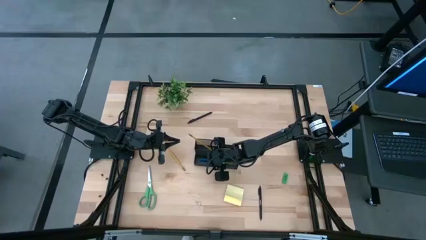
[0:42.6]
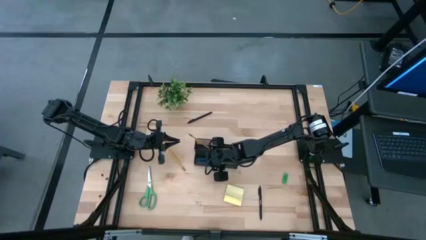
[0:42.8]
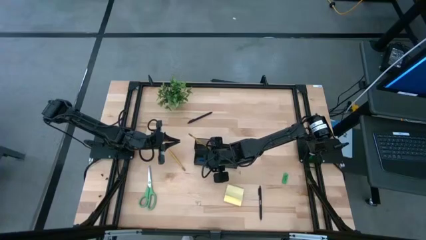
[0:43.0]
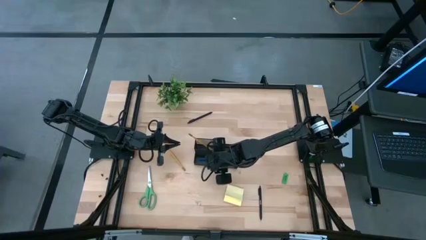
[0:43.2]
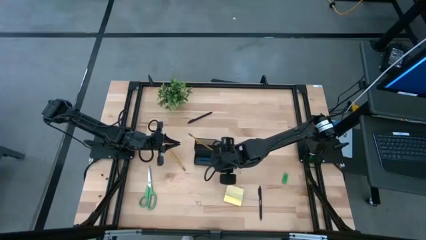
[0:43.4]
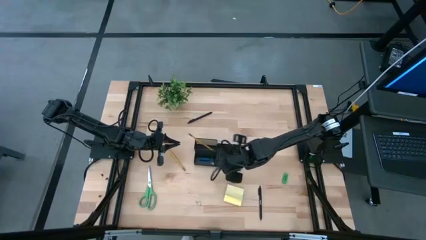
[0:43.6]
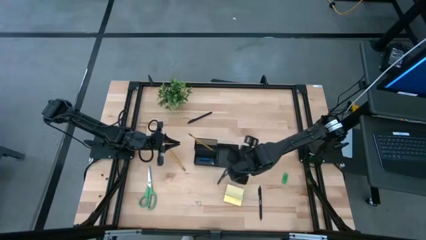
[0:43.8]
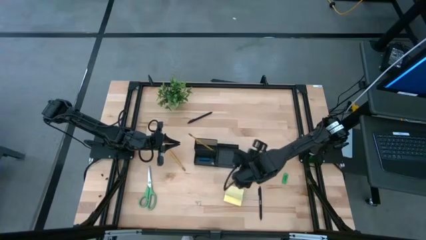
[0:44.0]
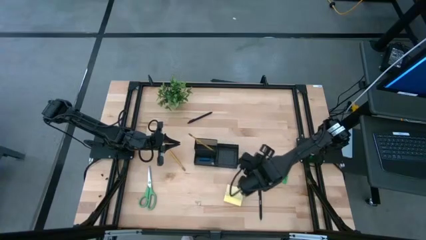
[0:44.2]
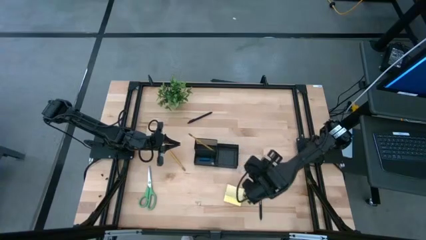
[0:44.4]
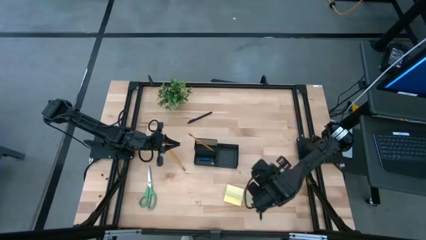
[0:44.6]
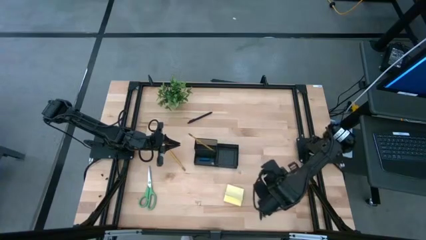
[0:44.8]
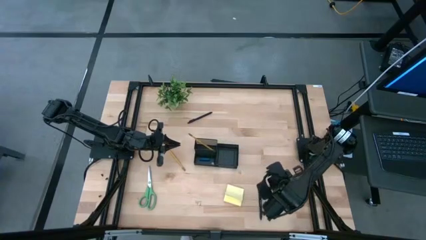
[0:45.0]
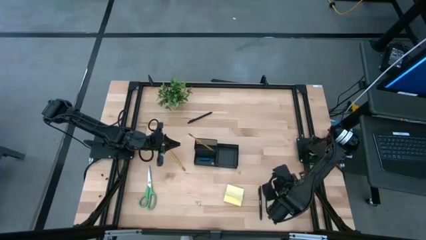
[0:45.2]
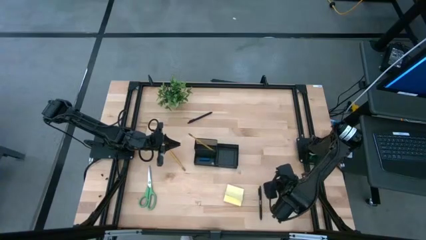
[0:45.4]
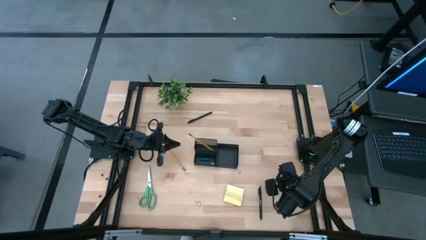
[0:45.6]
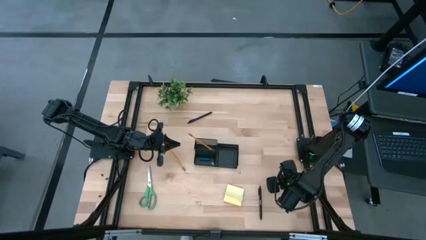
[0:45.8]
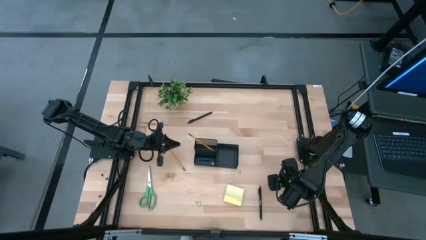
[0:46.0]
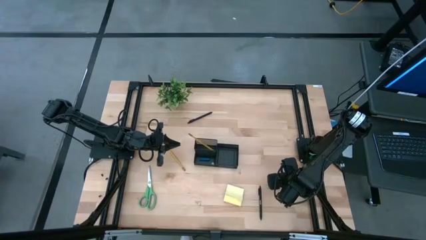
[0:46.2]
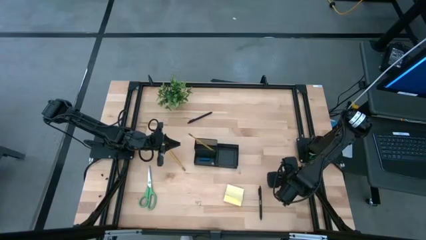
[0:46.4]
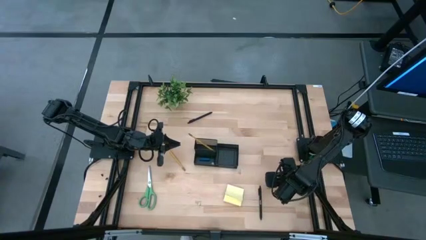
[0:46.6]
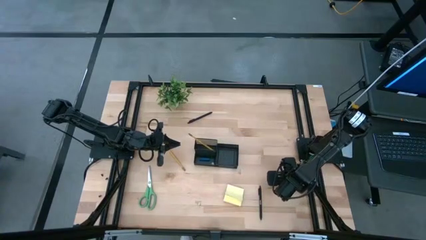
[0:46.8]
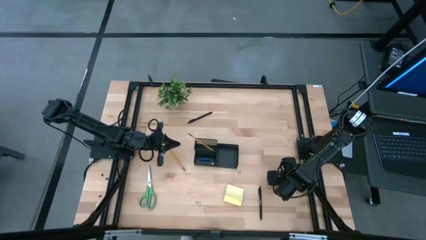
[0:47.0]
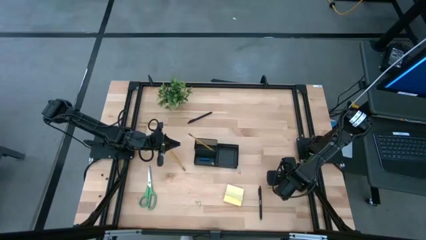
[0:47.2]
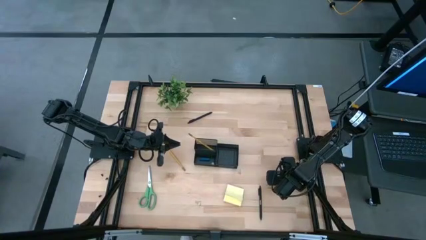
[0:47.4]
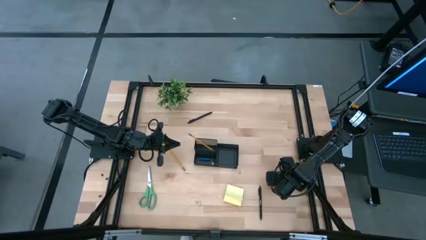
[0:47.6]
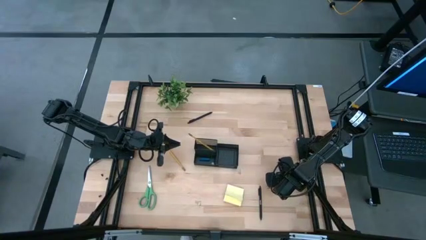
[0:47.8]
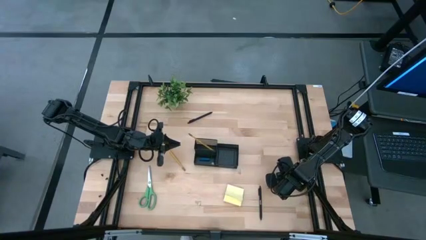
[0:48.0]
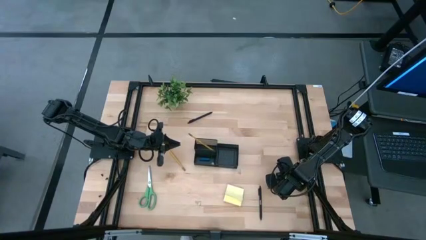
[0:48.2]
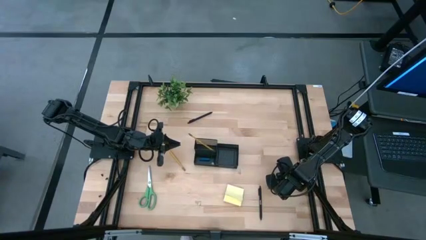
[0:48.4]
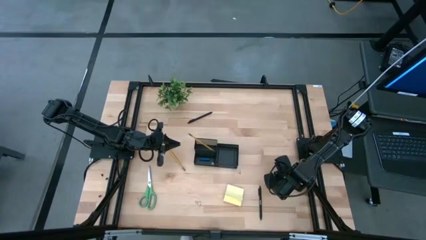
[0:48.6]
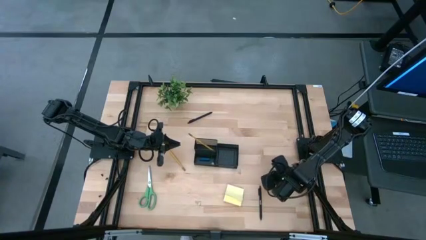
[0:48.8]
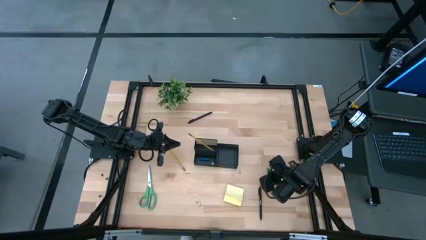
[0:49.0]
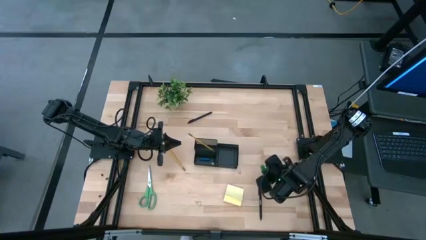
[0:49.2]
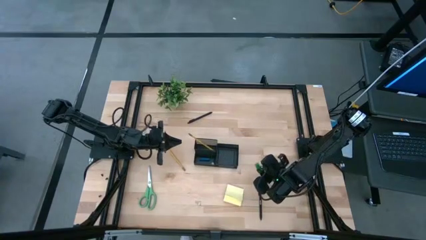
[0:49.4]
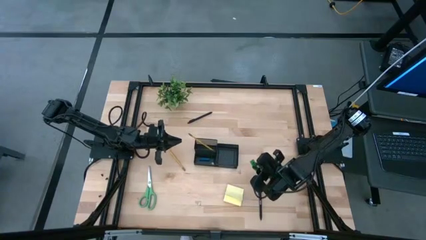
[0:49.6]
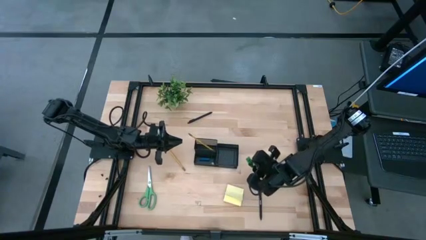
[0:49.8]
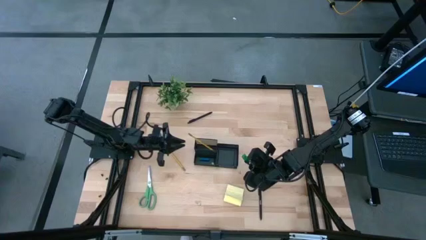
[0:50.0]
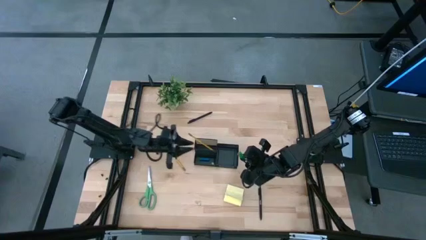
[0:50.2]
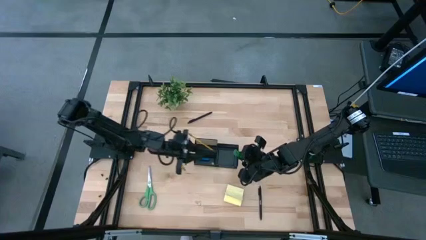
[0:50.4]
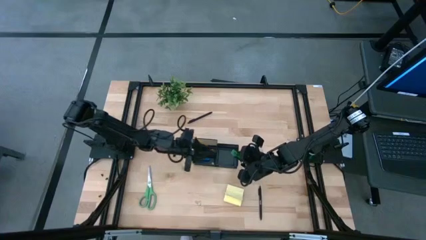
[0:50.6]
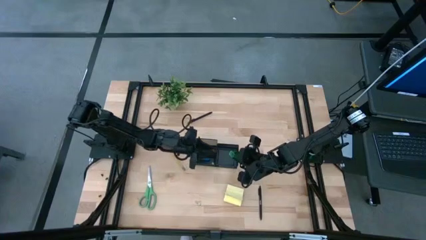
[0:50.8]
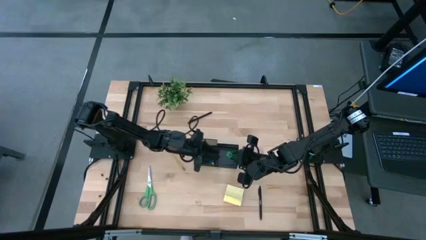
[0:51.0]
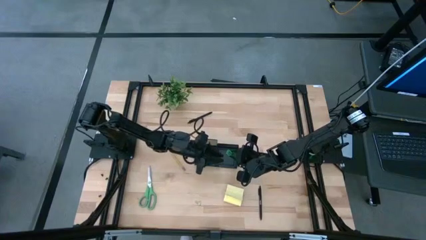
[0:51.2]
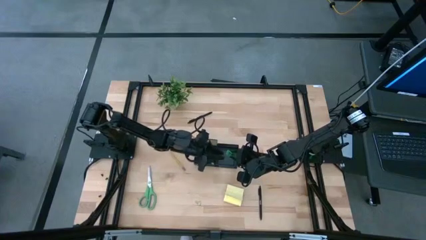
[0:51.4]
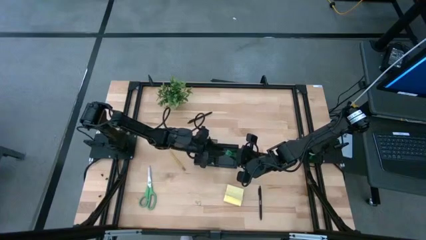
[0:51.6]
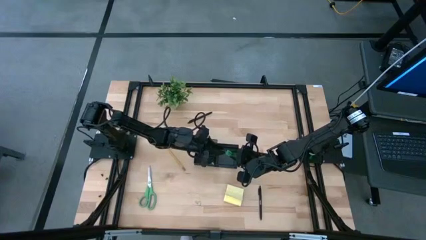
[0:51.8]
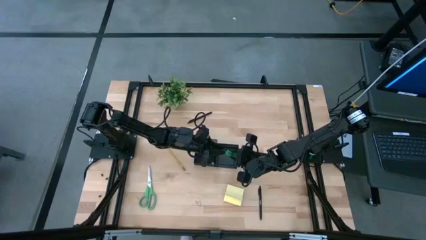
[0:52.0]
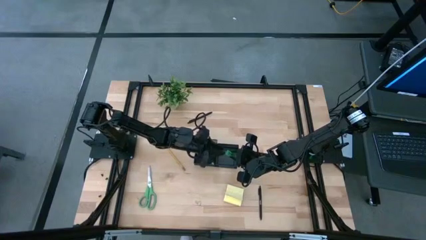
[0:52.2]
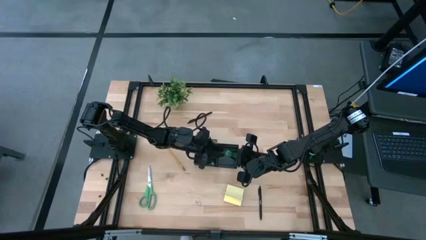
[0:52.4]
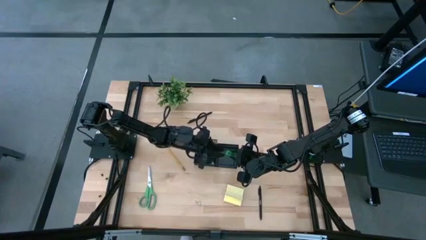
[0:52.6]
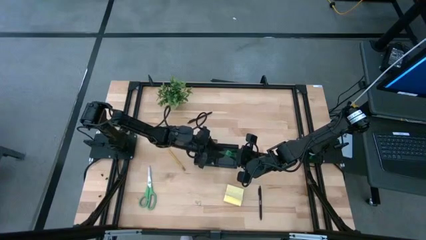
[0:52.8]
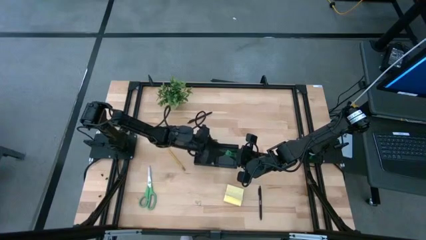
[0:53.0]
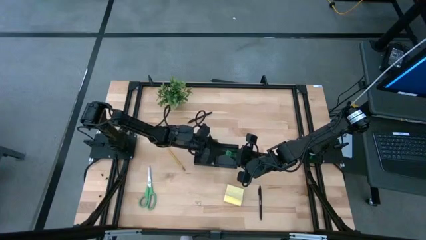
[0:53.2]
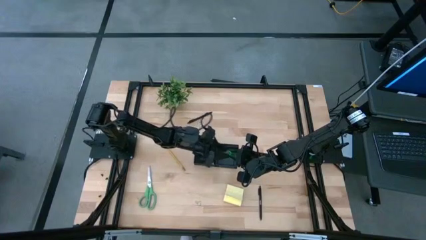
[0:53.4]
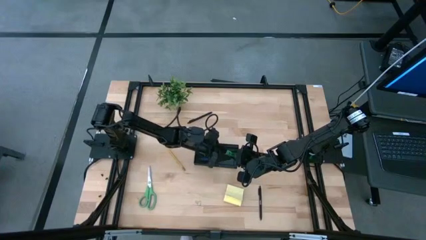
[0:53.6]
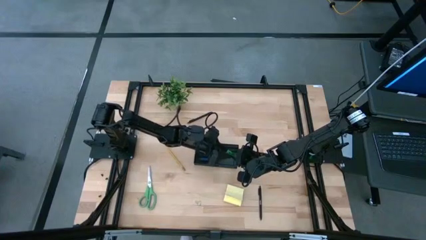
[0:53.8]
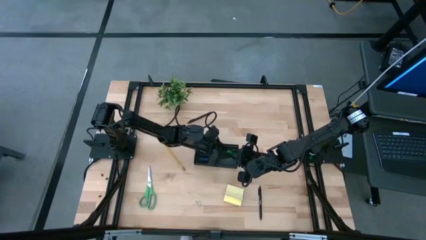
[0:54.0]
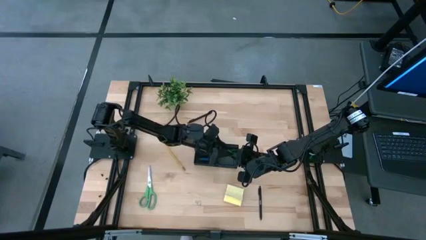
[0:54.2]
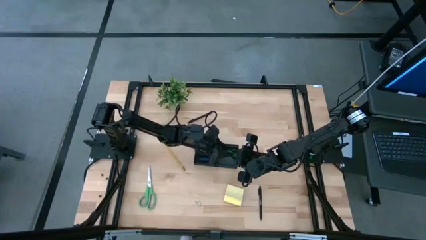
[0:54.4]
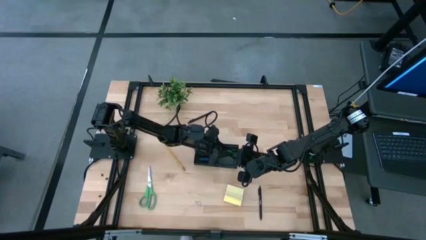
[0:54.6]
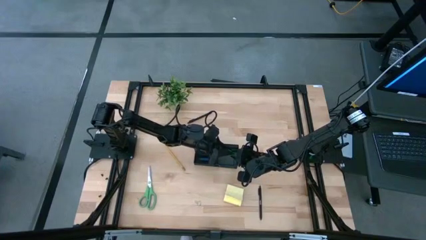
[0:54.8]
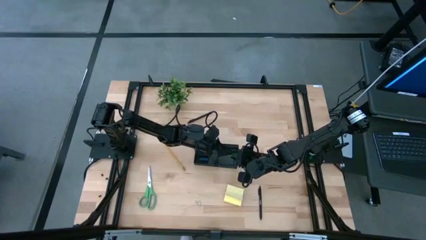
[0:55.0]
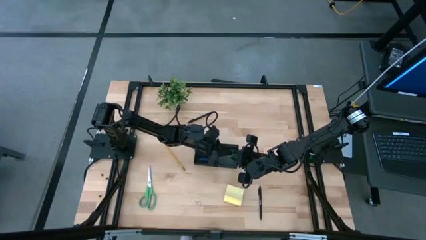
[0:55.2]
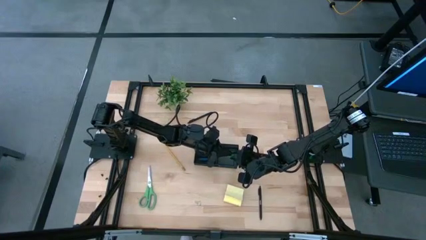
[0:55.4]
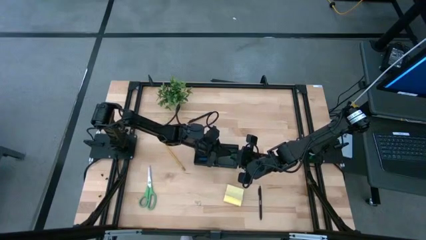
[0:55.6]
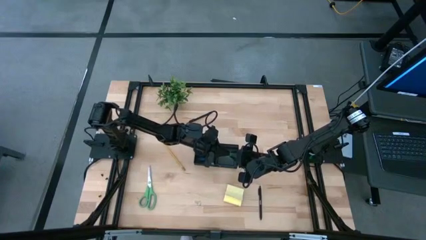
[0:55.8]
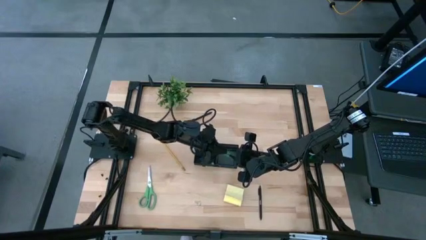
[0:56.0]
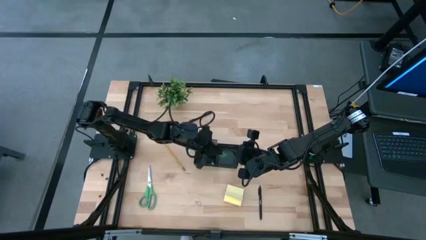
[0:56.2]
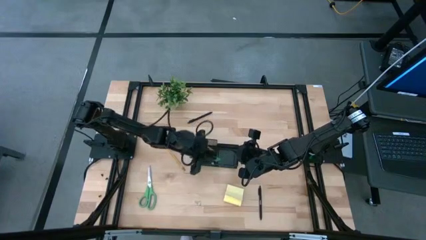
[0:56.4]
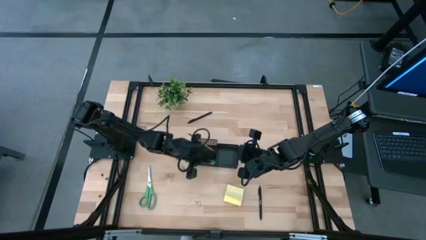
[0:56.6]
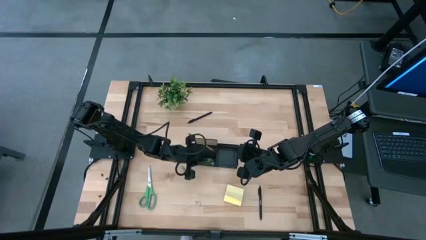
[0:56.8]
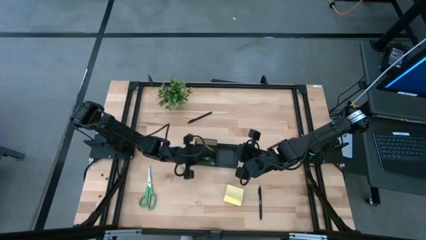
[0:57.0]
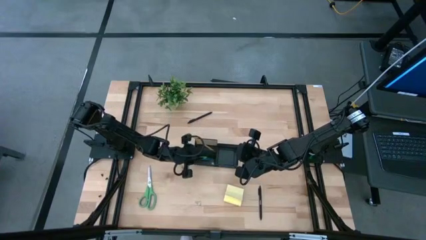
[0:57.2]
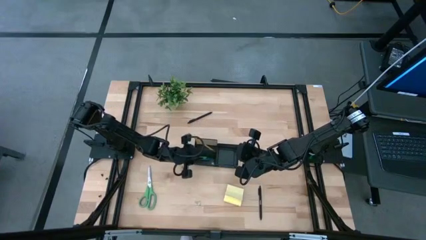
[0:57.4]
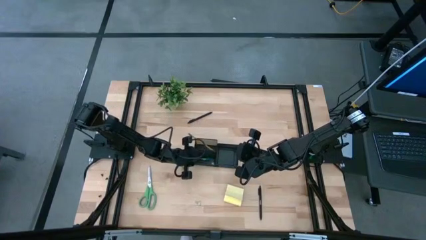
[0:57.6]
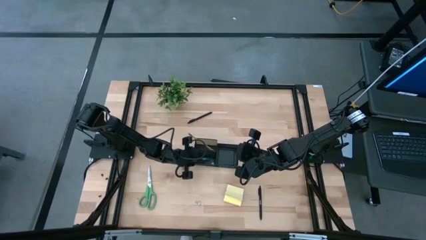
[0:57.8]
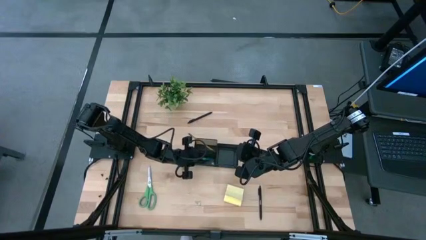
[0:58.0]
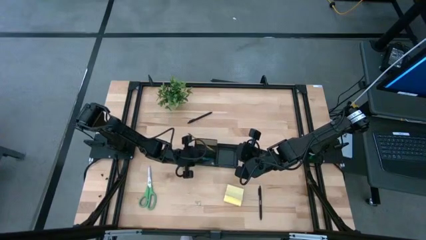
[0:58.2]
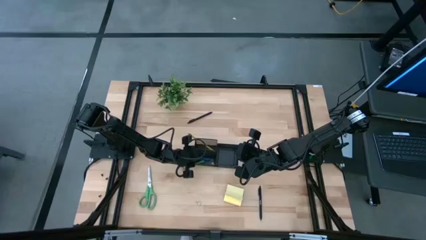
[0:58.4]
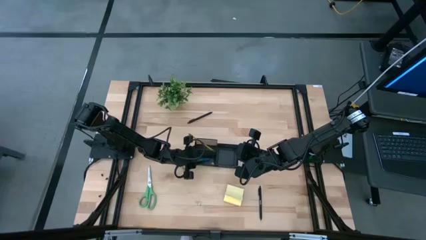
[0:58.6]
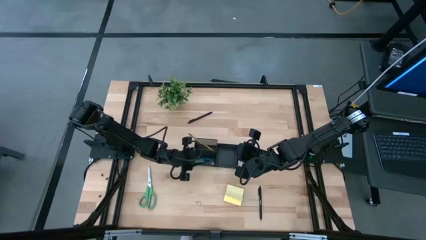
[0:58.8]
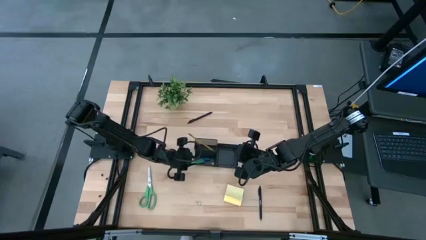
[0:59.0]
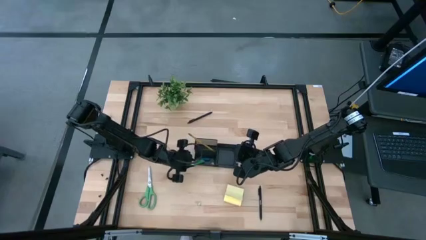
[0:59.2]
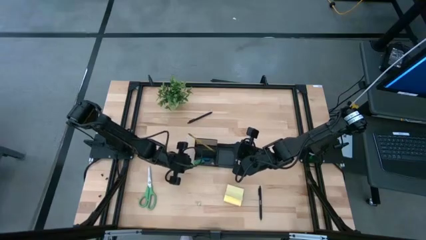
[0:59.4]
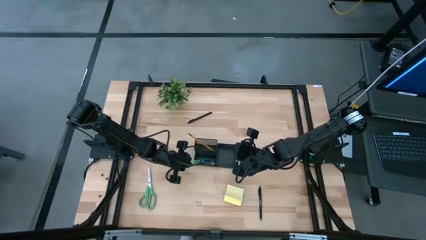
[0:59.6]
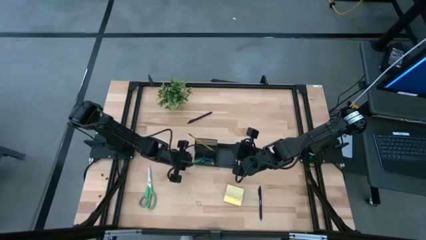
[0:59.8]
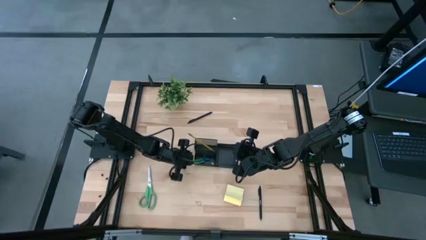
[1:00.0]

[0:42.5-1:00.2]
Task: Pick and place office supplies into organizer
Put the green eraser into the black desk organizer

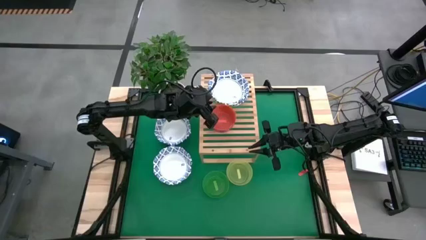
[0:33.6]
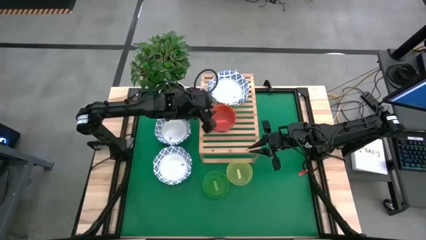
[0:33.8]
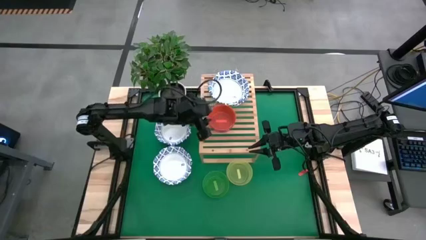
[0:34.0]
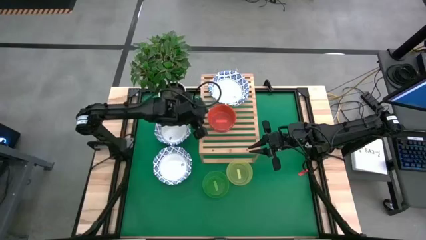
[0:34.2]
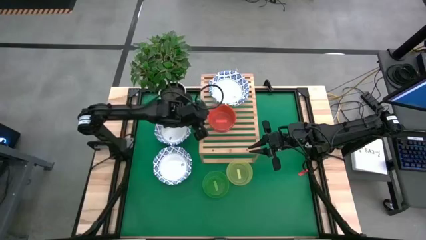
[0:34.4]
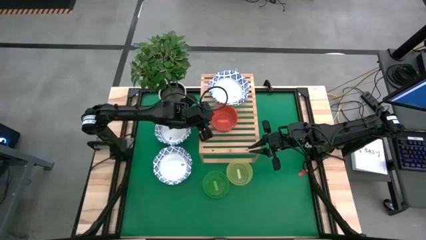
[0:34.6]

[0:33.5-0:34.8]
Task: Place and stack bowls onto a shelf
Adjust the bottom stacked bowls on the shelf
